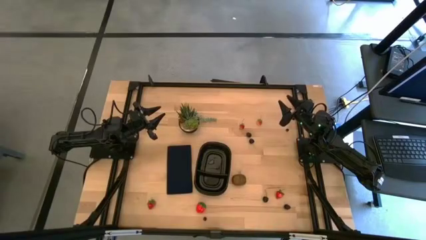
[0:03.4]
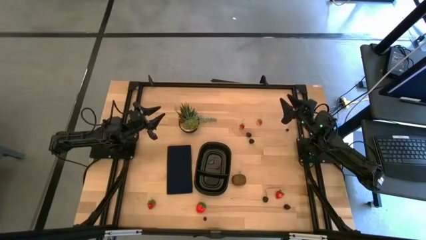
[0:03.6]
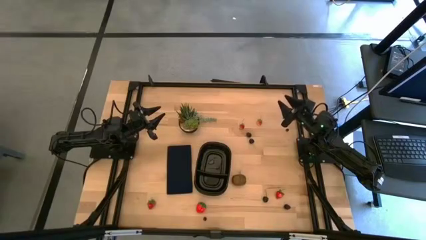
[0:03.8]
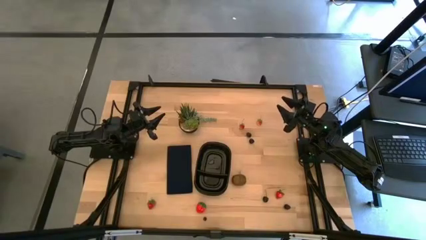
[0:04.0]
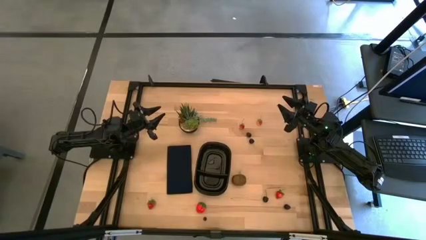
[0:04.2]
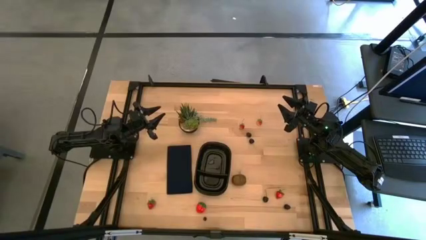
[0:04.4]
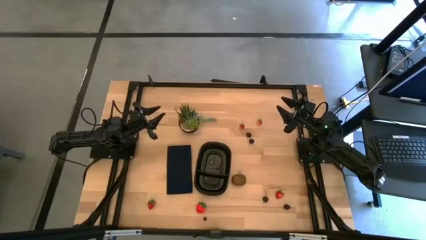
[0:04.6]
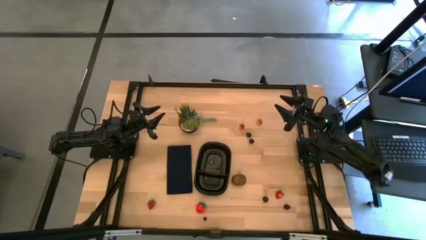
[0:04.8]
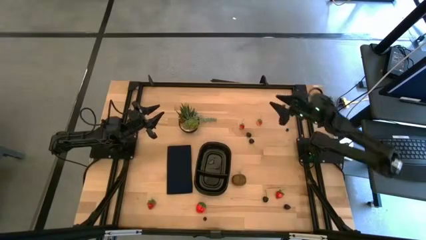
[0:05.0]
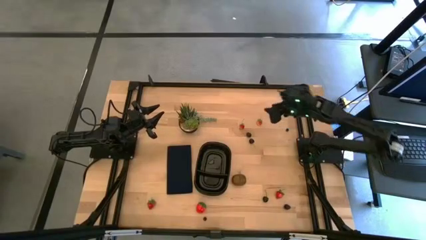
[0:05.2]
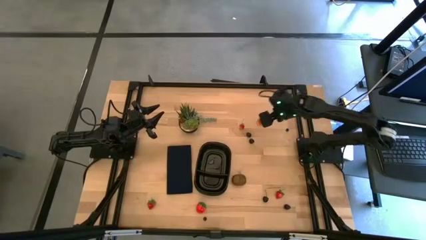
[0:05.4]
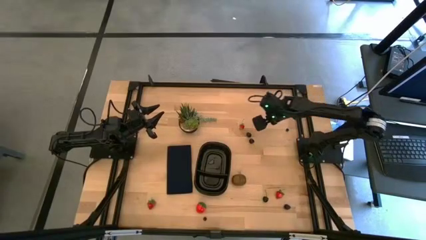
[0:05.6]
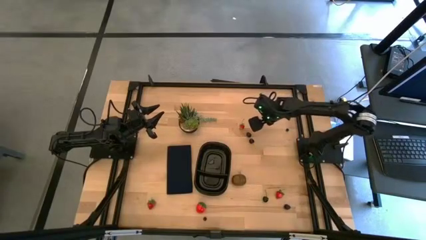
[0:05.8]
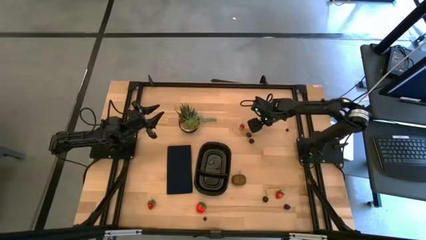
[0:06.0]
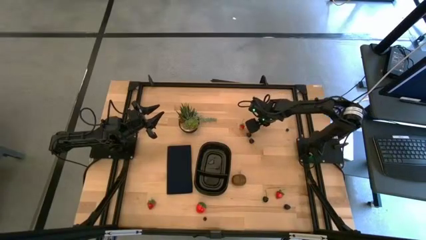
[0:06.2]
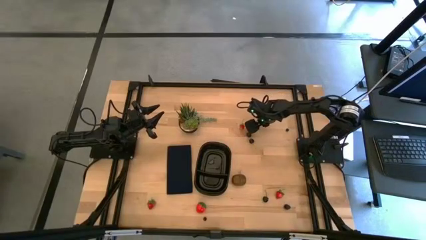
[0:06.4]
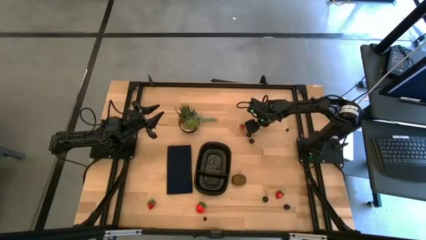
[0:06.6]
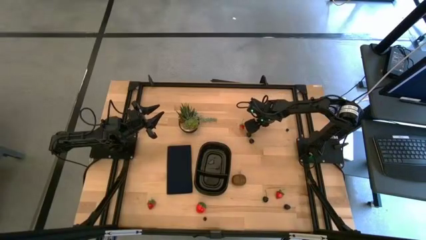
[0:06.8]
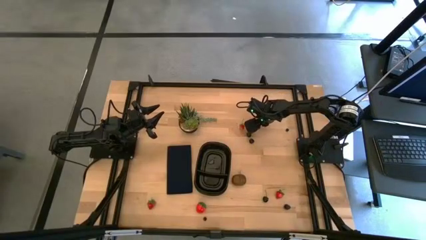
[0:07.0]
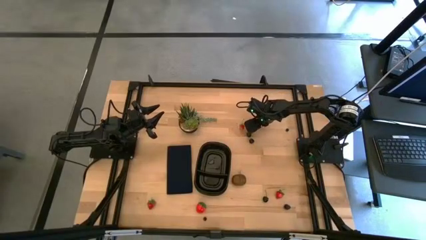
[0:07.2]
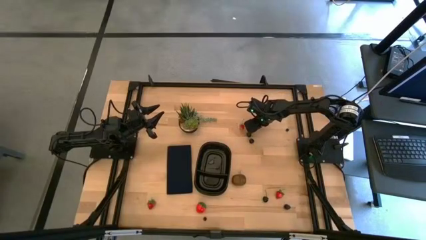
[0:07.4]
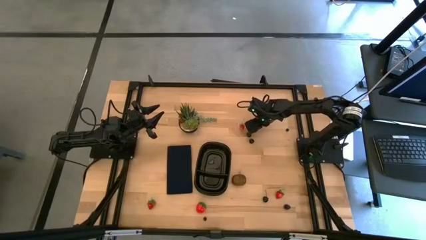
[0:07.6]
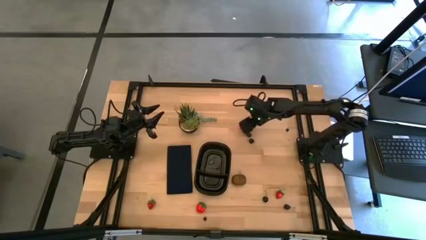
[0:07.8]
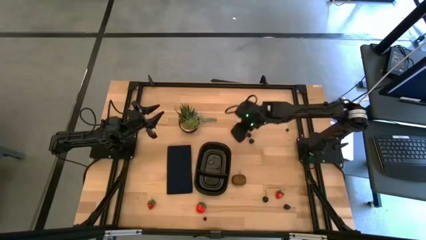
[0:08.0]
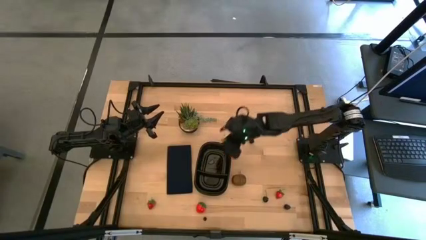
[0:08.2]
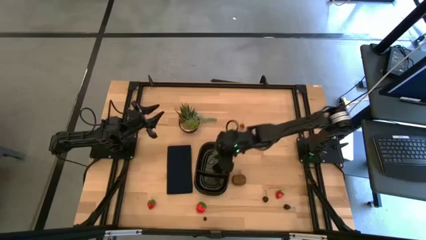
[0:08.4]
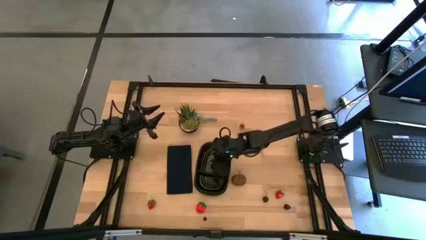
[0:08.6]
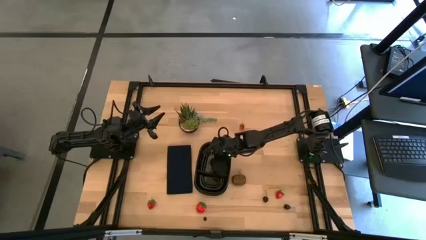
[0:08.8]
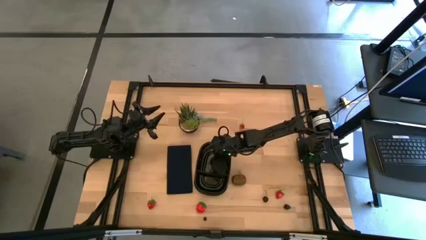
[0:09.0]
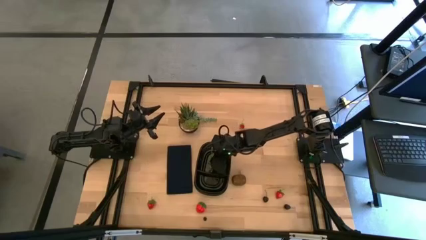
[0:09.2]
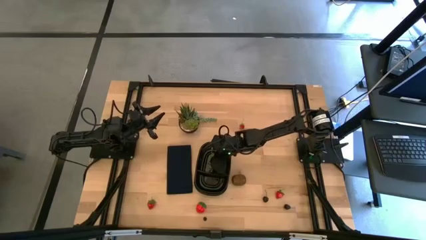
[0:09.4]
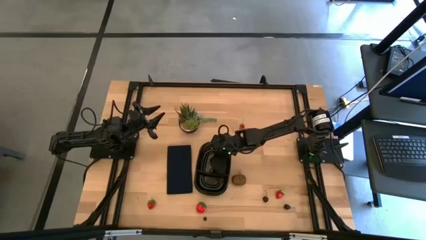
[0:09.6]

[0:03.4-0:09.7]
Task: Pick and placing Produce into tupperware
Put the red strawberry into the black bin

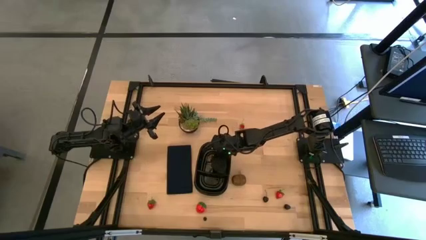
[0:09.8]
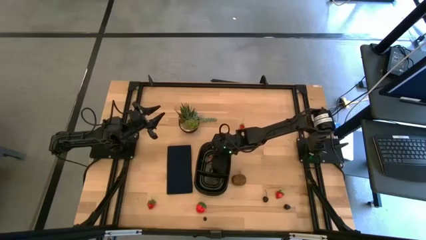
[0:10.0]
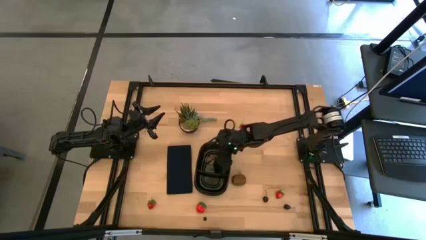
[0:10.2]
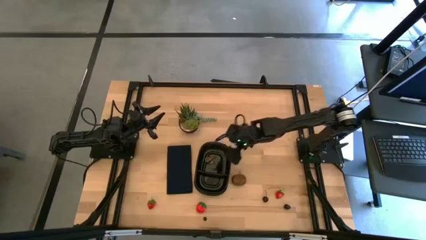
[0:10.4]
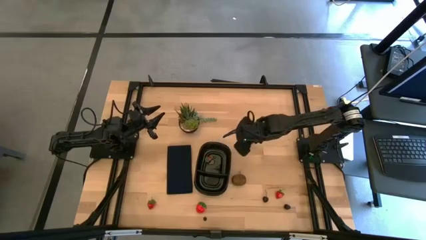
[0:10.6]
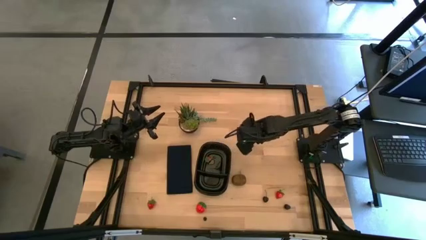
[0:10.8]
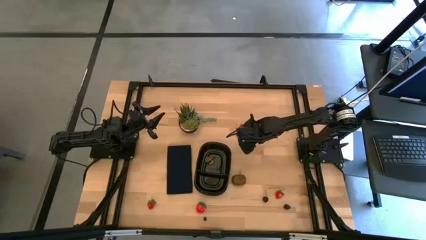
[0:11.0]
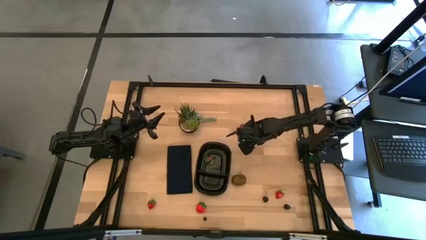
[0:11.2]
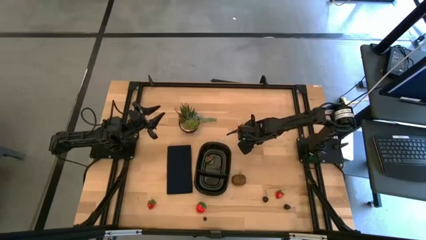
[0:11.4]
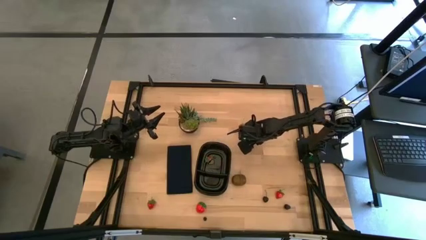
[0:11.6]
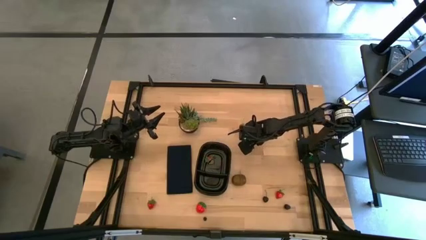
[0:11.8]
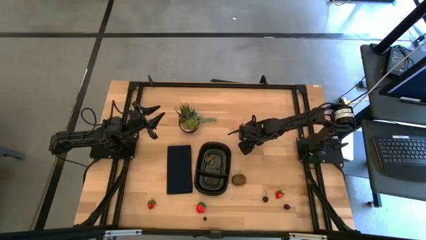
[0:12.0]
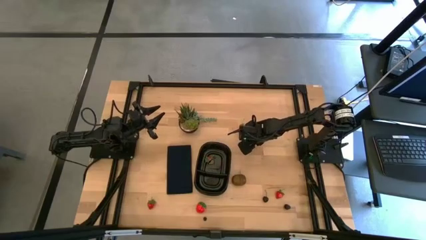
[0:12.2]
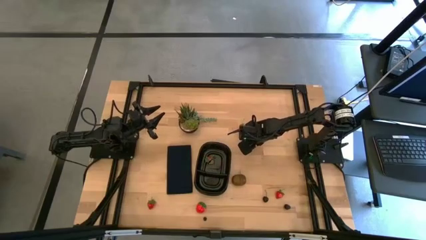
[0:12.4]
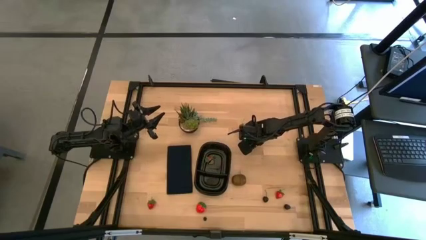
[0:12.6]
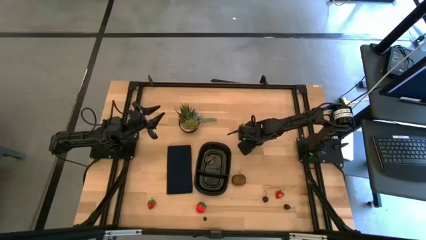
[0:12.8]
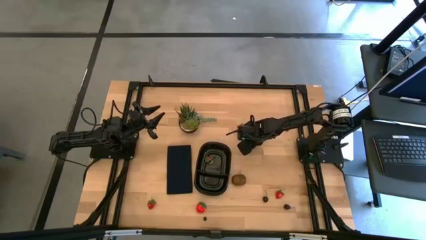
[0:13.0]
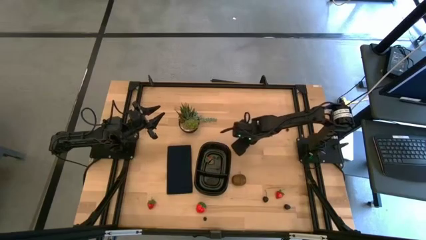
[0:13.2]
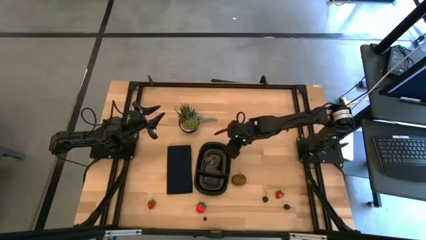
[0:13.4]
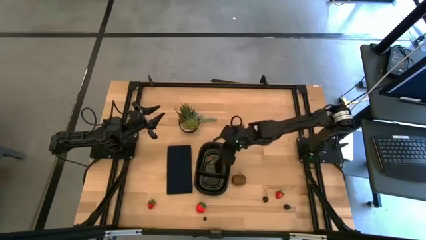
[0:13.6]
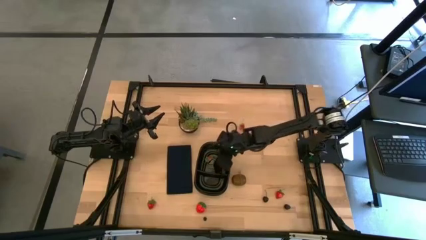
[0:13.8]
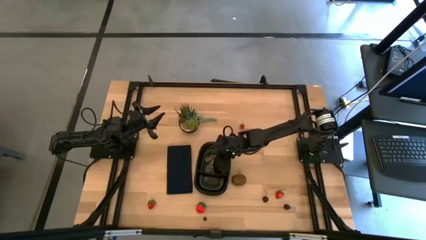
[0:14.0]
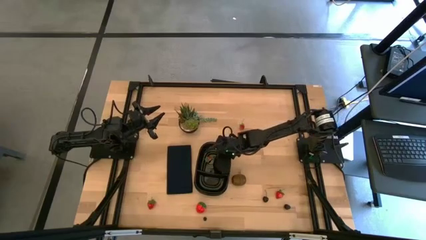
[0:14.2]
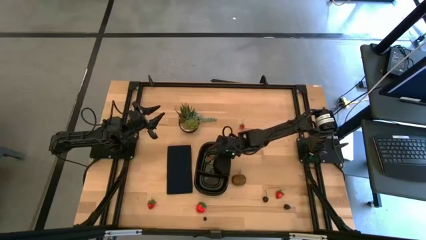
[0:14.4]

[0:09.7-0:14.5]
Put the black cherry into the black bin

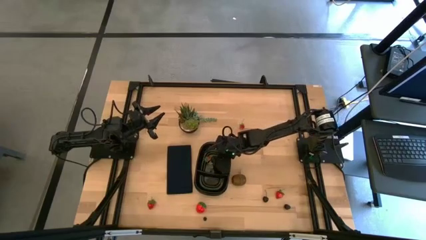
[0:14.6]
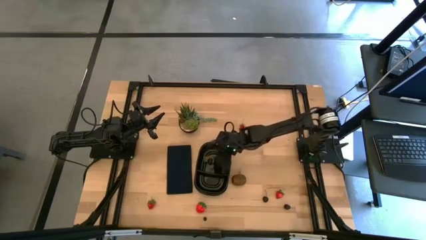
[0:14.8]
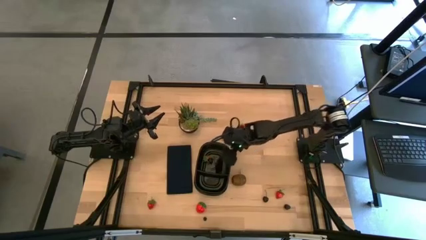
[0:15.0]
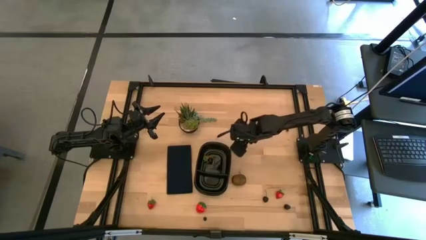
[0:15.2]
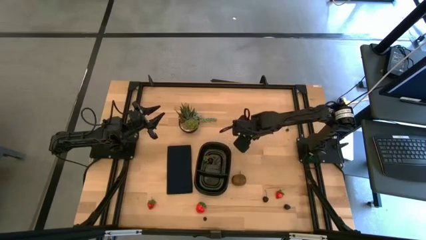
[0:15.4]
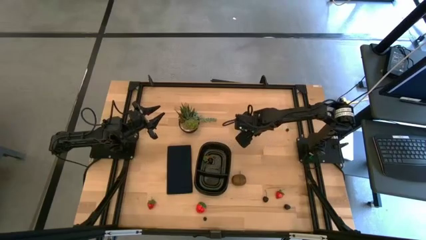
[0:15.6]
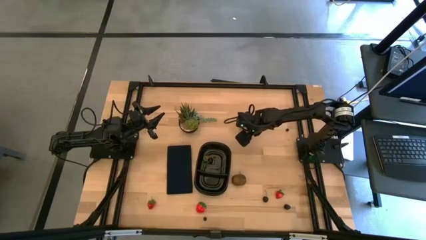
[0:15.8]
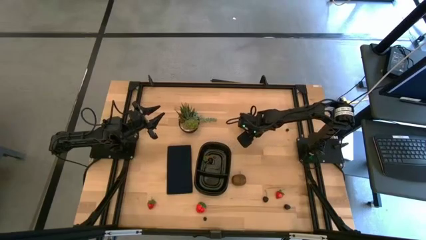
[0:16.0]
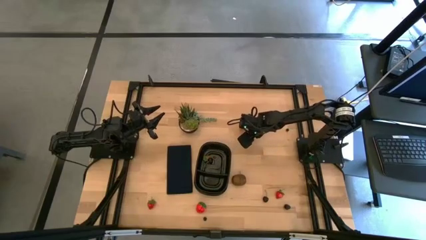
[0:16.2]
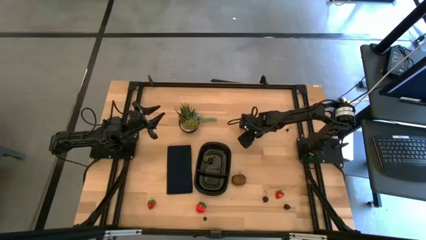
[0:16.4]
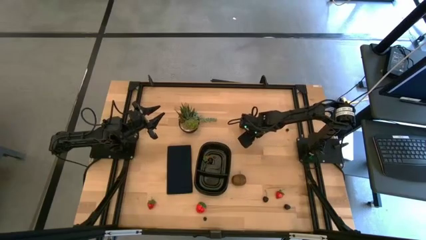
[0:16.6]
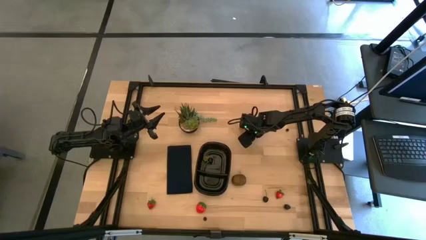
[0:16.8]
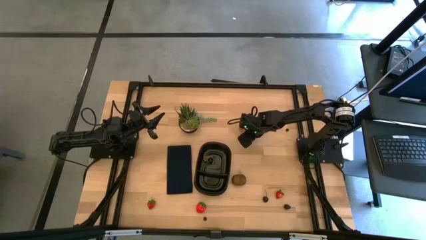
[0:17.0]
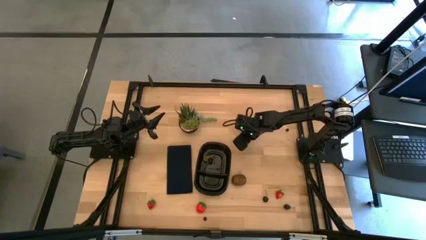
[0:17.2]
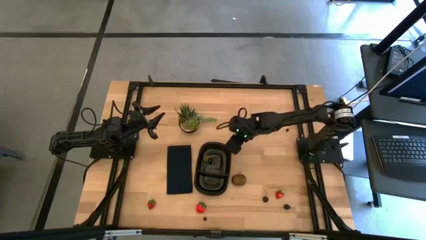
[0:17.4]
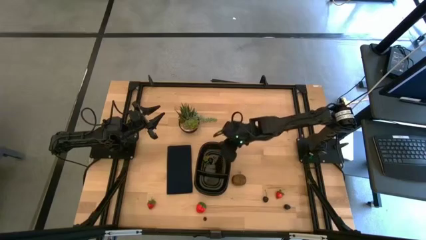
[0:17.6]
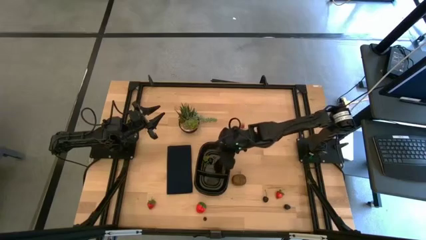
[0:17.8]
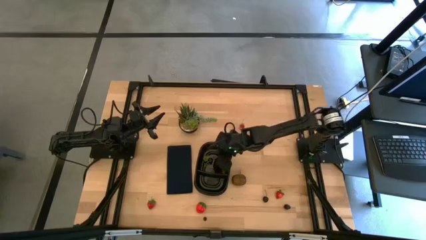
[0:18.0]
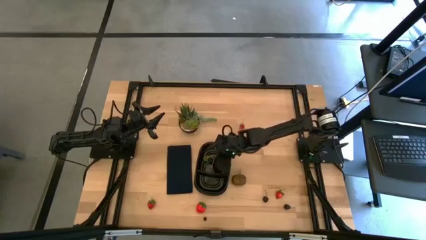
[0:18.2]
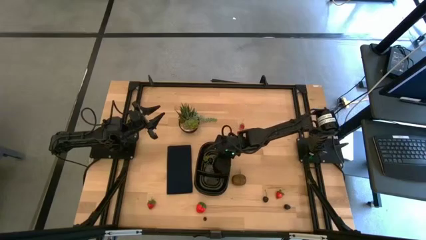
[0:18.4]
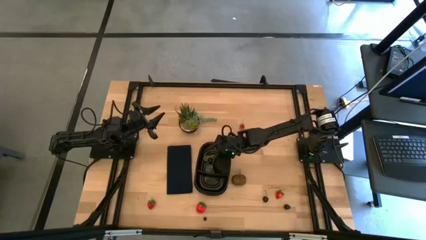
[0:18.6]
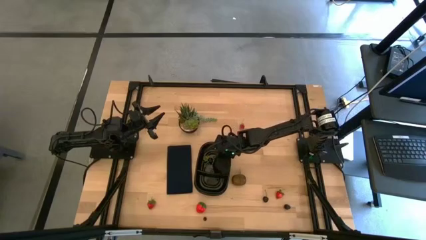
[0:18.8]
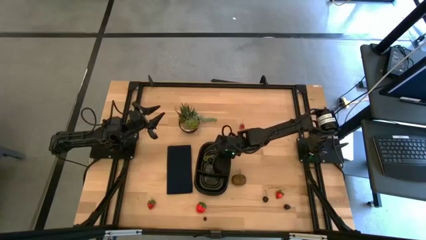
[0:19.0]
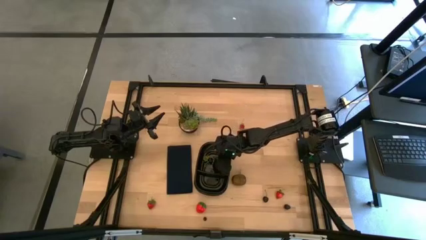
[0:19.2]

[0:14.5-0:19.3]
Put the black raspberry into the black bin
